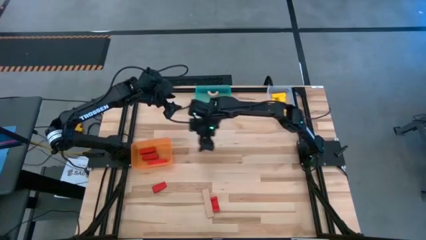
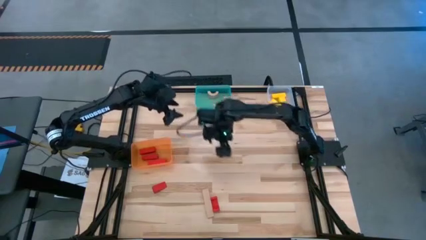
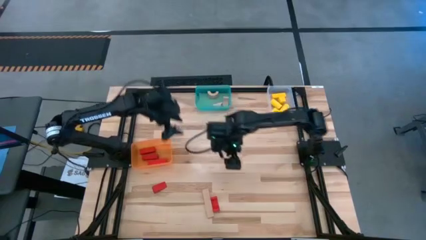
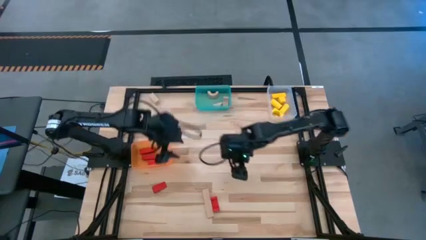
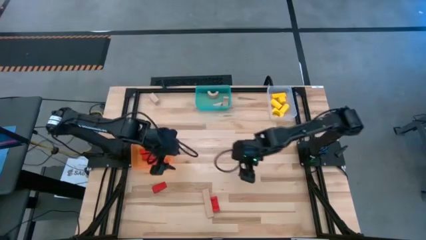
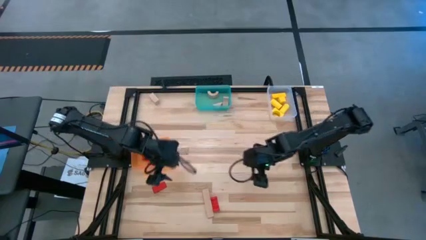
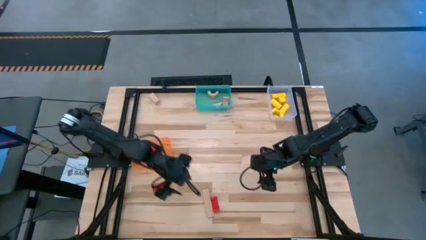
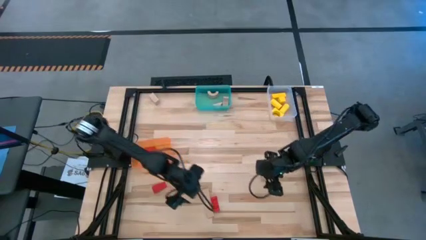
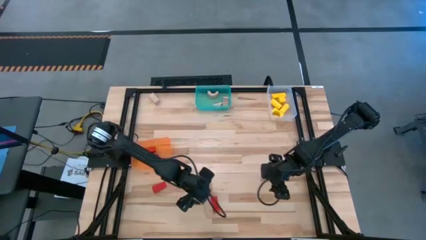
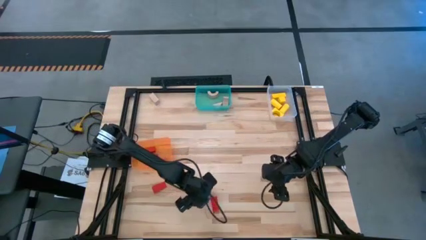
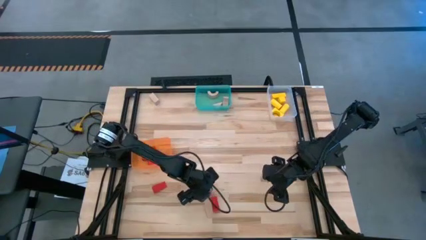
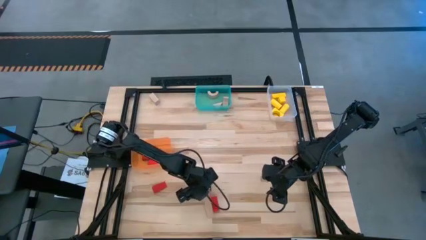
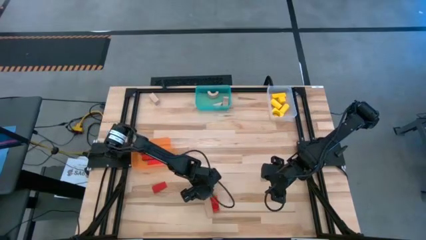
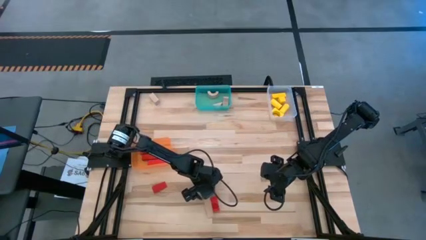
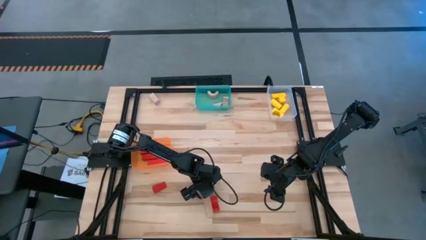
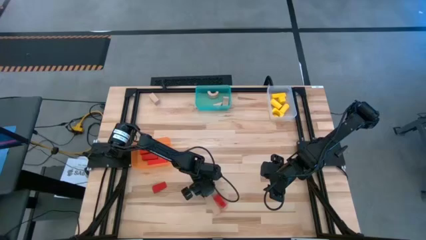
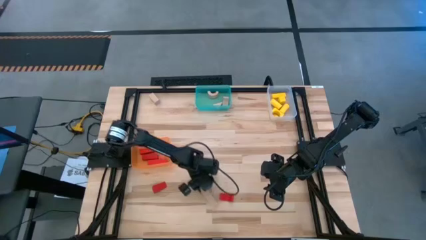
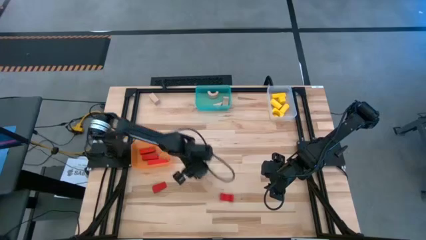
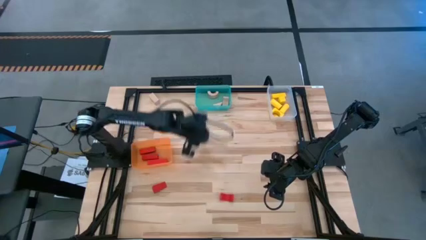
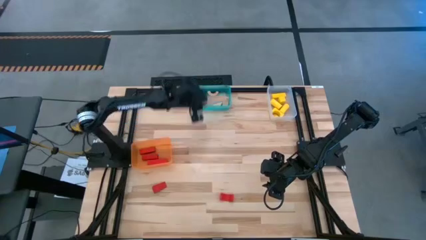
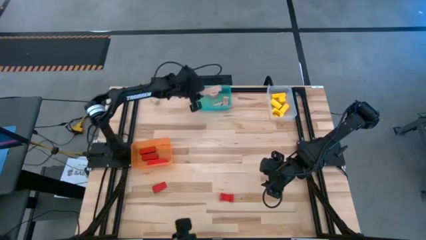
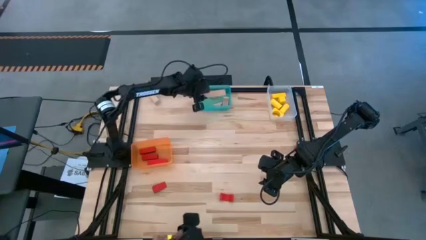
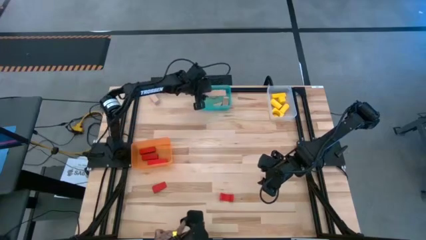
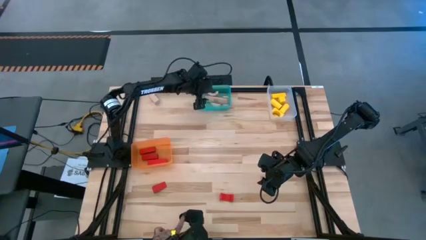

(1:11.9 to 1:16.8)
Task: Sort & place blocks by color
Put the brown block into the transparent blue bin

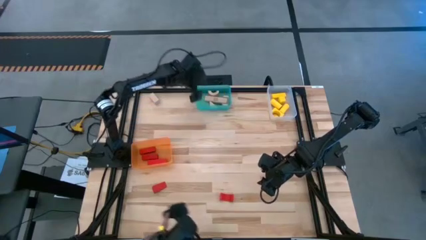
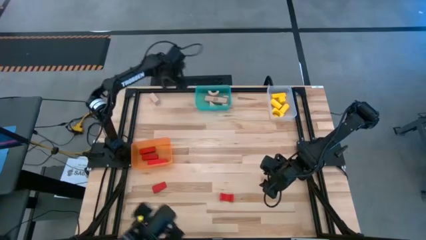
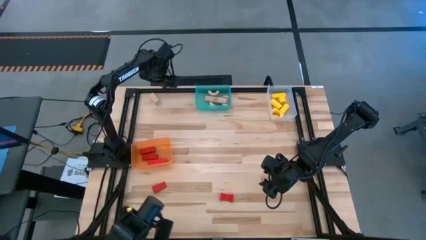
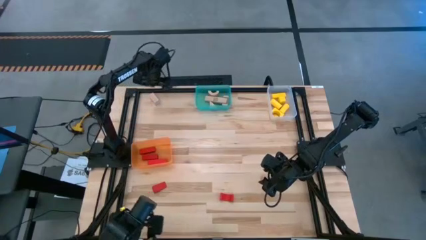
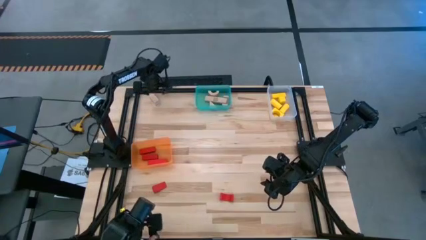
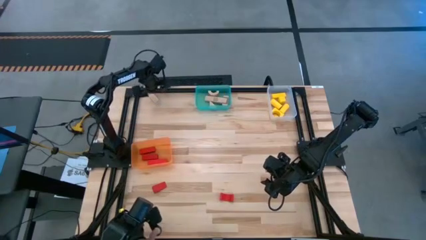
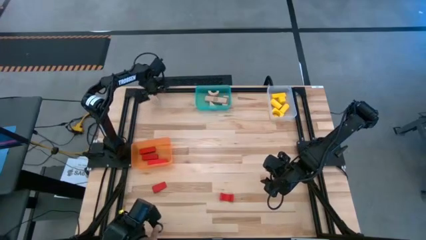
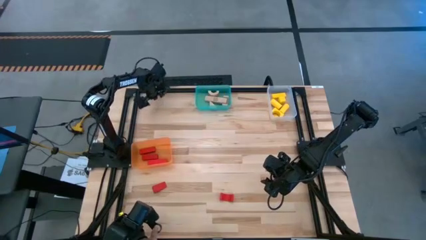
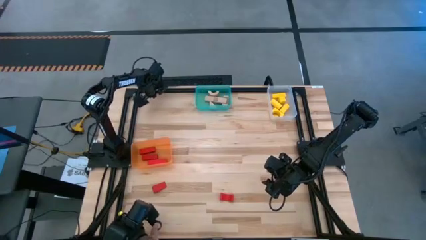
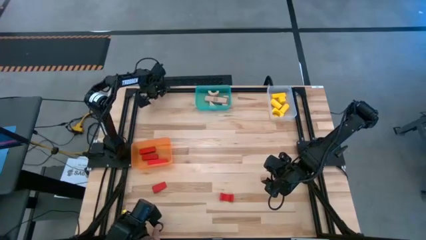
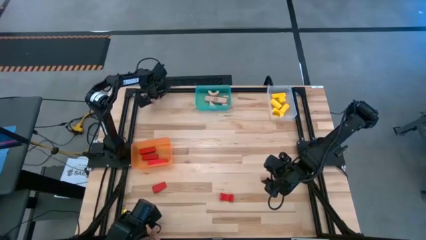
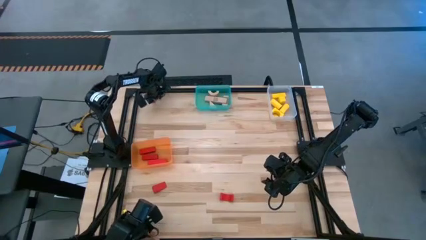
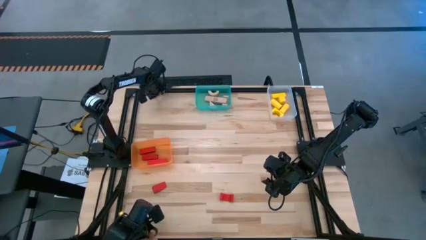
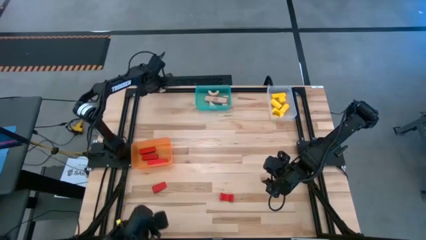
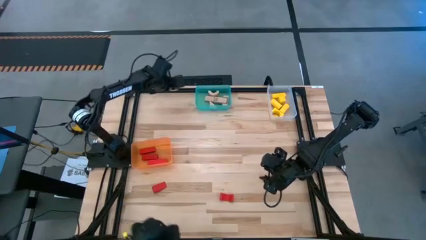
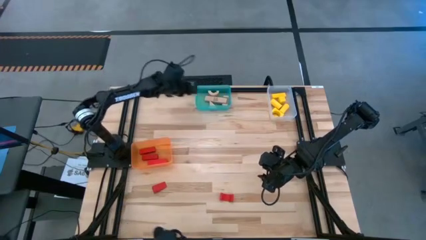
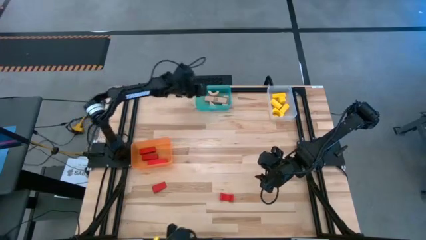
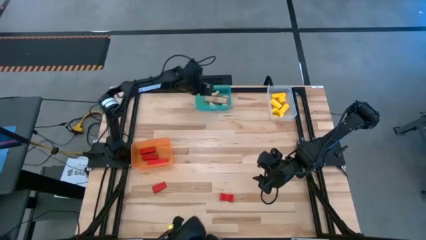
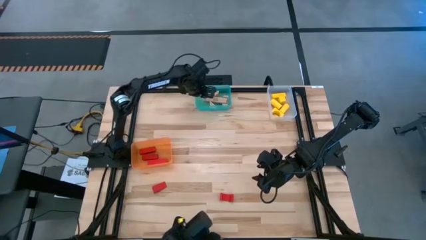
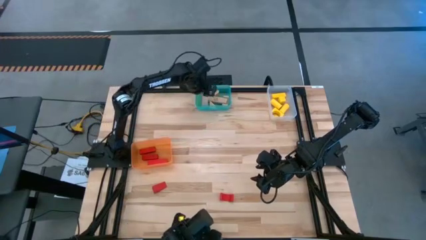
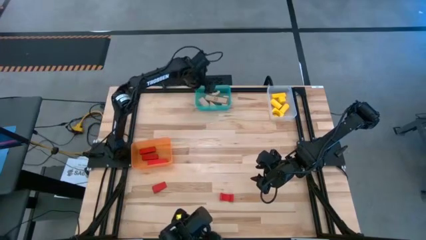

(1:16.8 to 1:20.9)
Put the brown block into the transparent blue bin

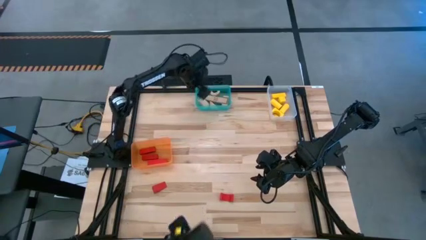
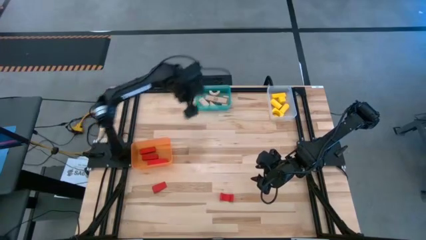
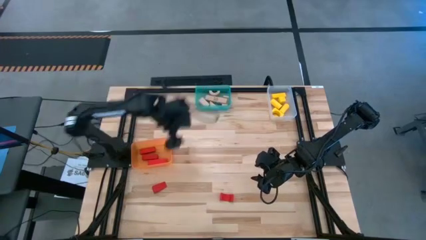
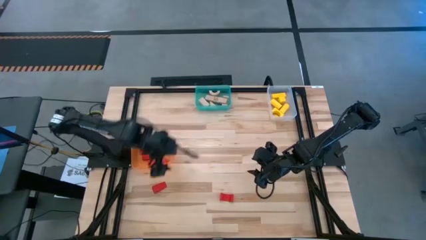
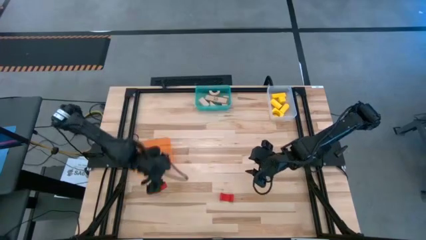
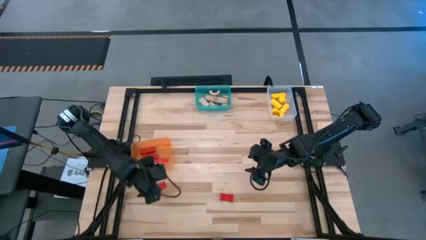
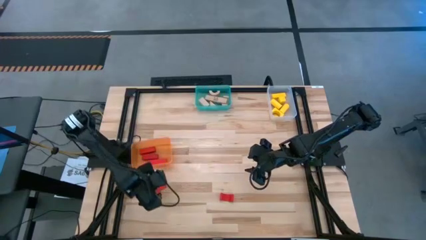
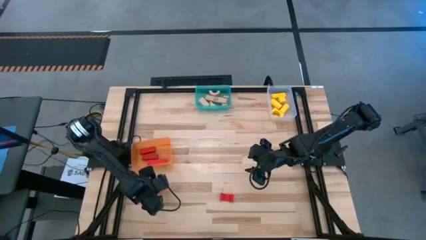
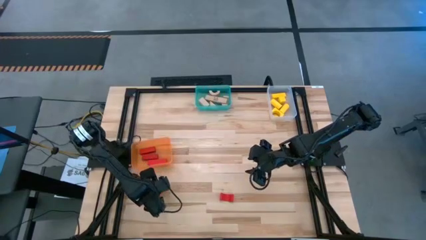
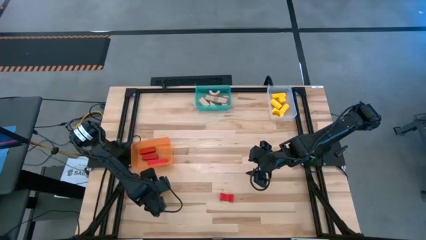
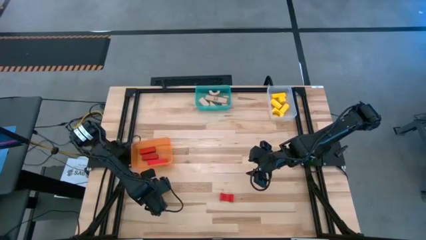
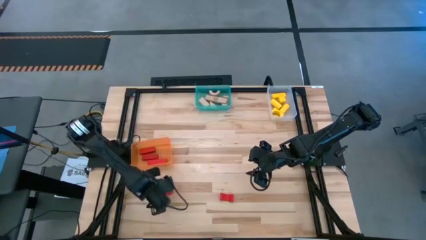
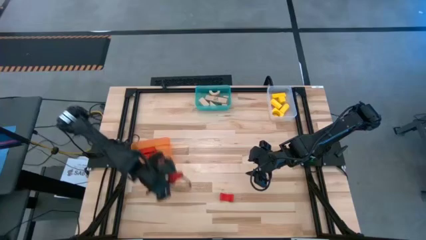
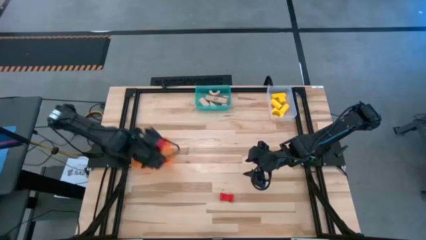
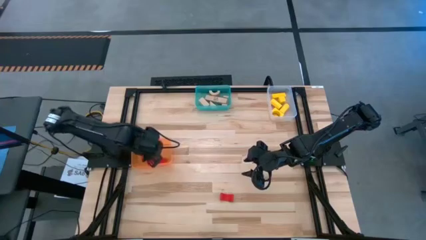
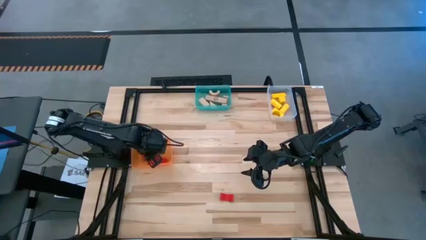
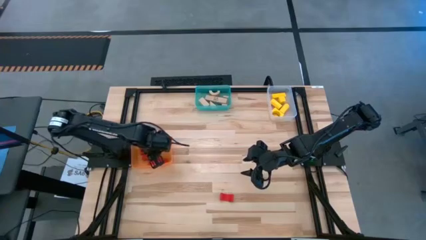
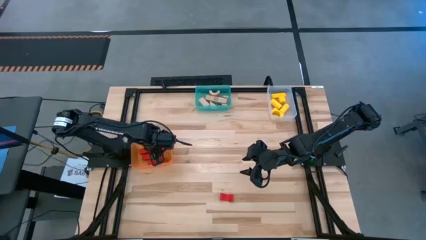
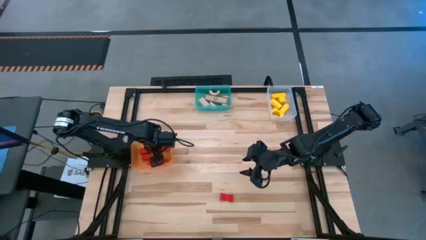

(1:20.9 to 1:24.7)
Put the red block into the transparent orange bin

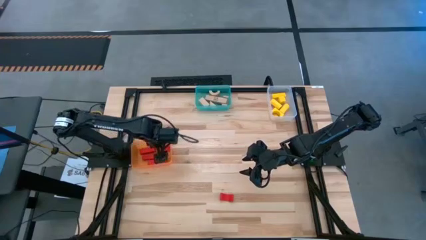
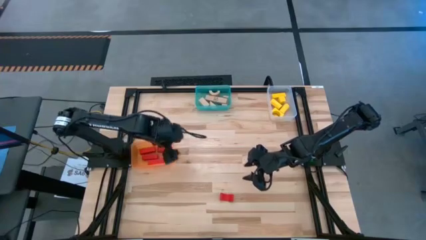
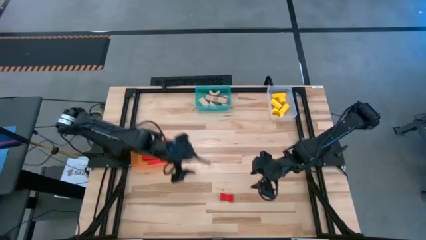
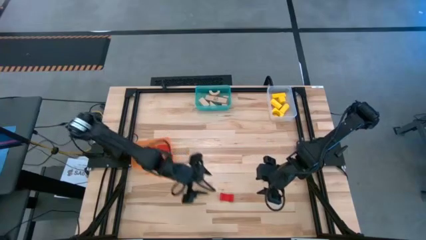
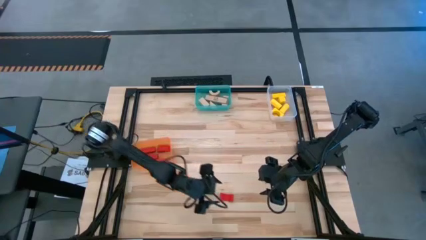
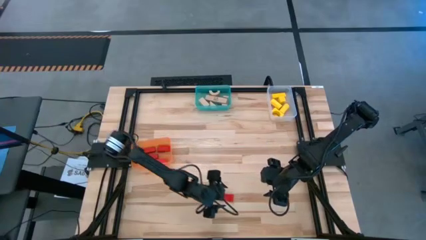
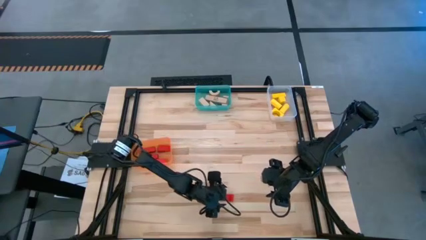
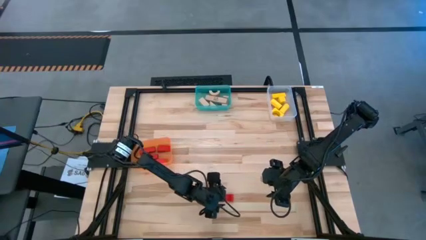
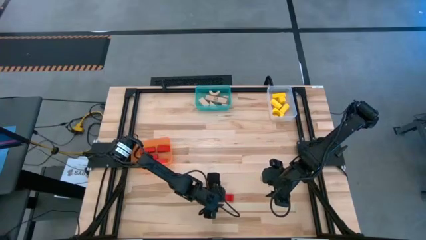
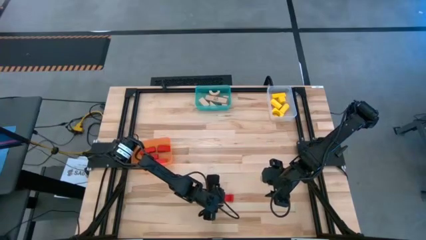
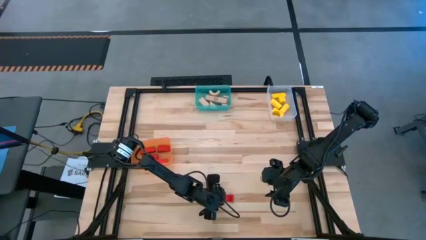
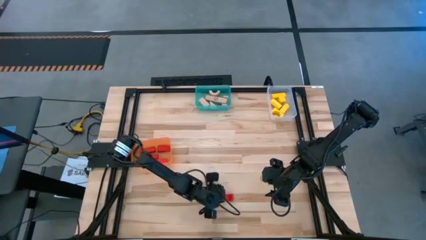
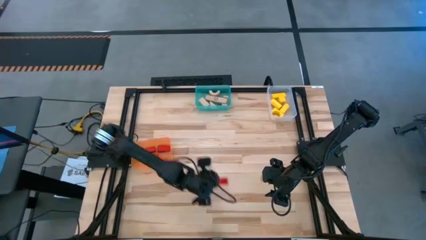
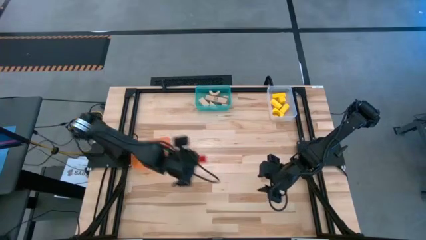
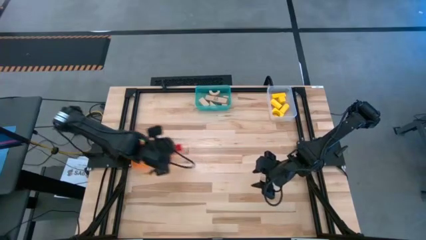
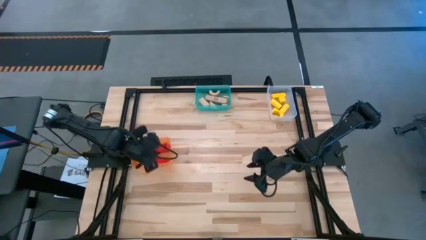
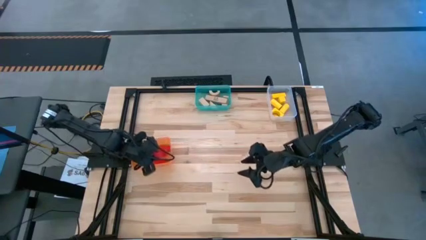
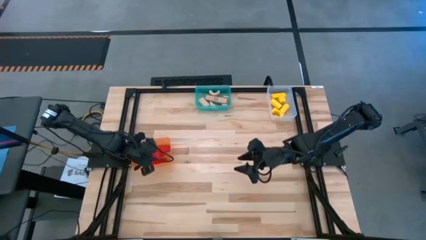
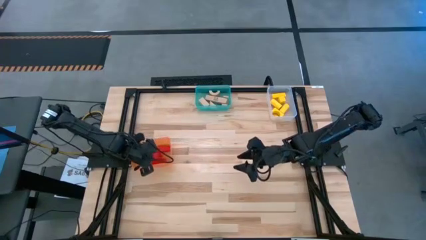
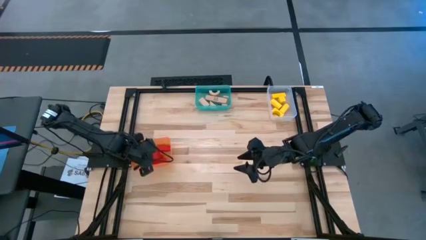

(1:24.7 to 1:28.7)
Put the red block into the transparent orange bin
